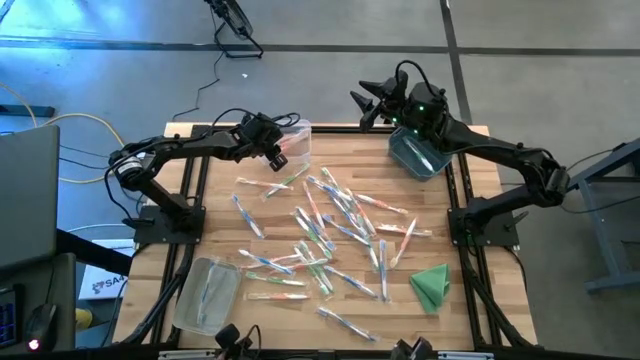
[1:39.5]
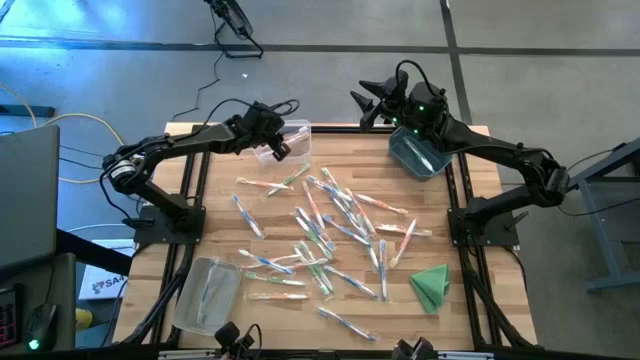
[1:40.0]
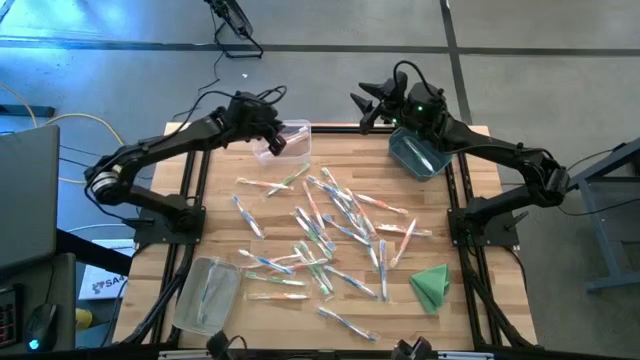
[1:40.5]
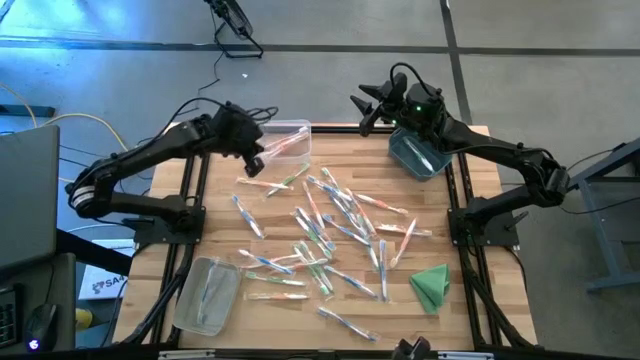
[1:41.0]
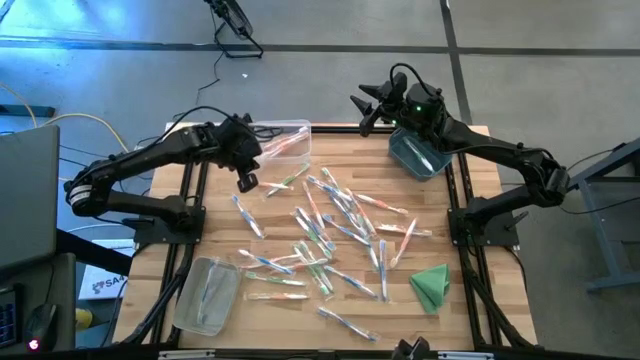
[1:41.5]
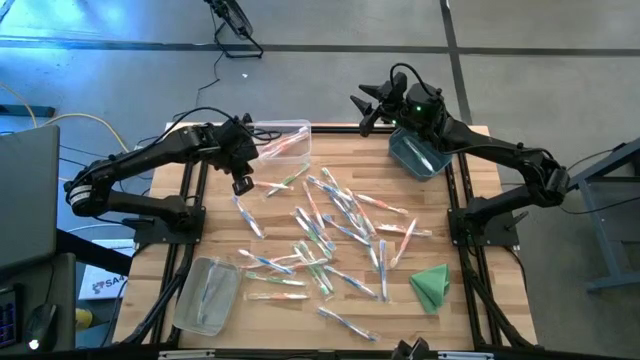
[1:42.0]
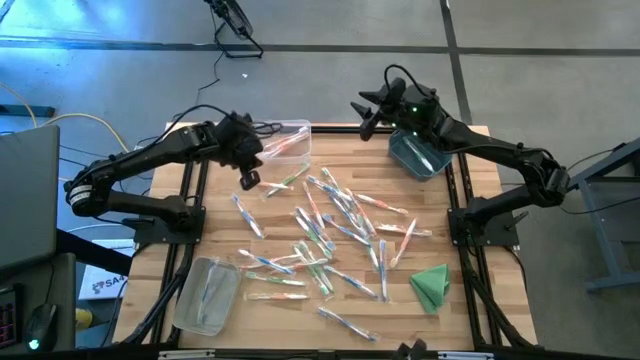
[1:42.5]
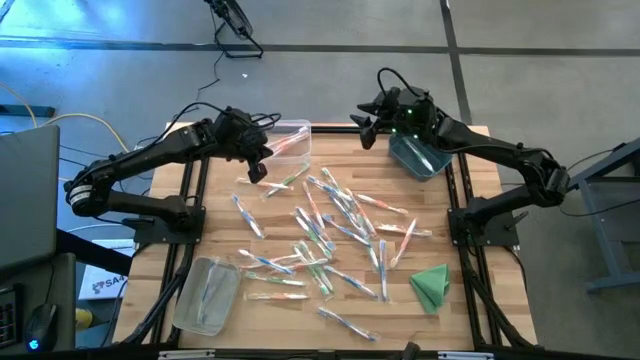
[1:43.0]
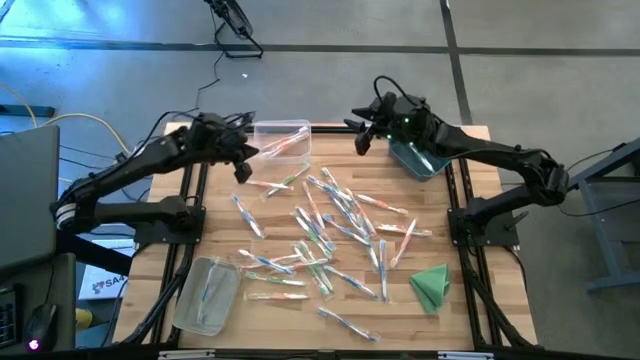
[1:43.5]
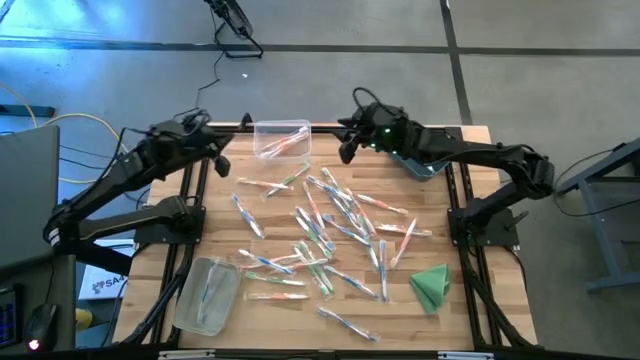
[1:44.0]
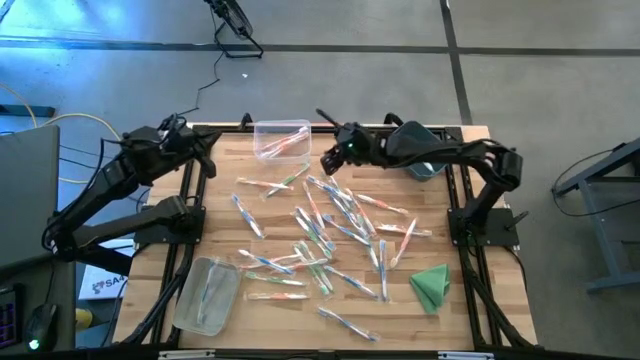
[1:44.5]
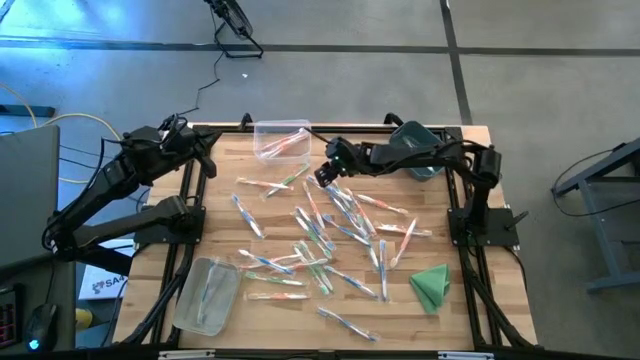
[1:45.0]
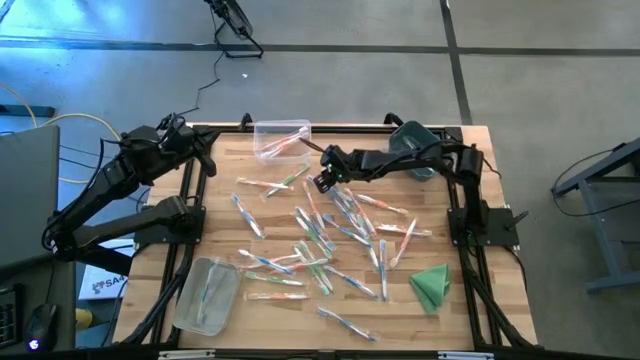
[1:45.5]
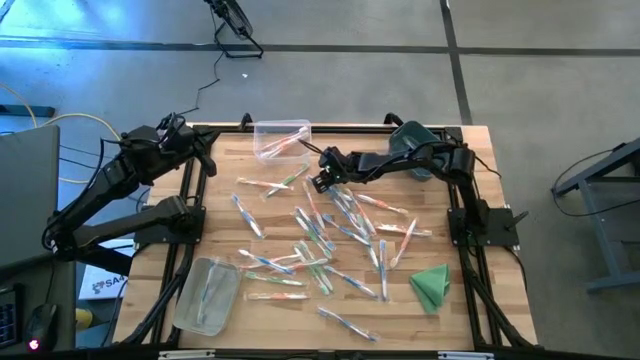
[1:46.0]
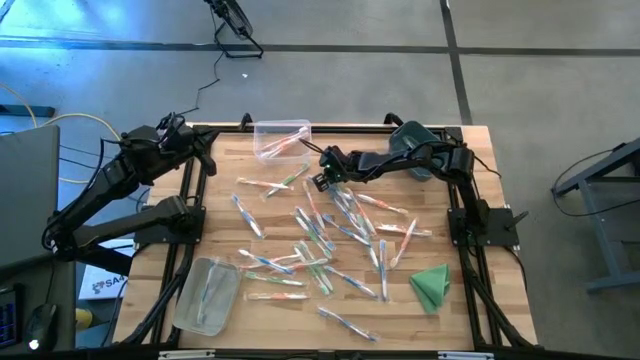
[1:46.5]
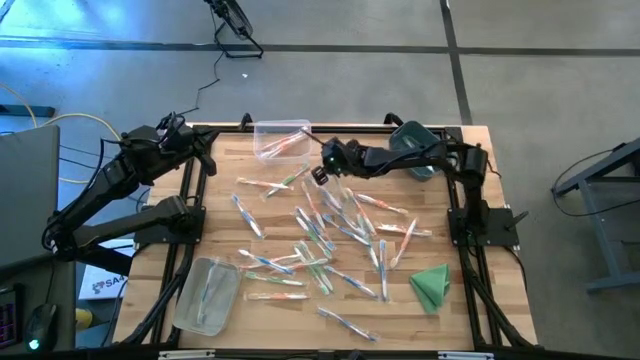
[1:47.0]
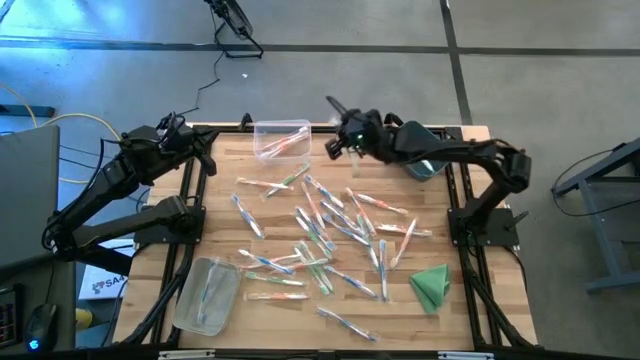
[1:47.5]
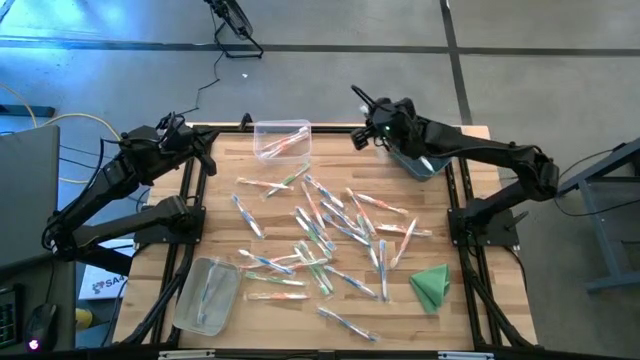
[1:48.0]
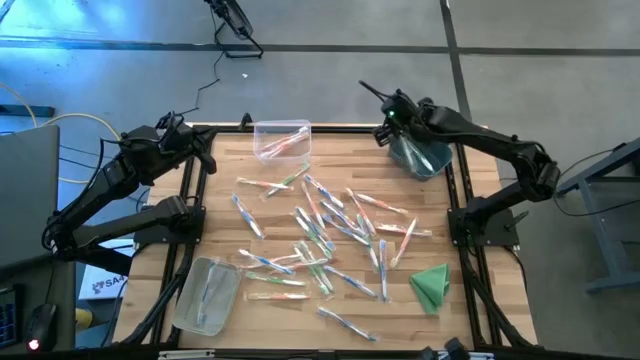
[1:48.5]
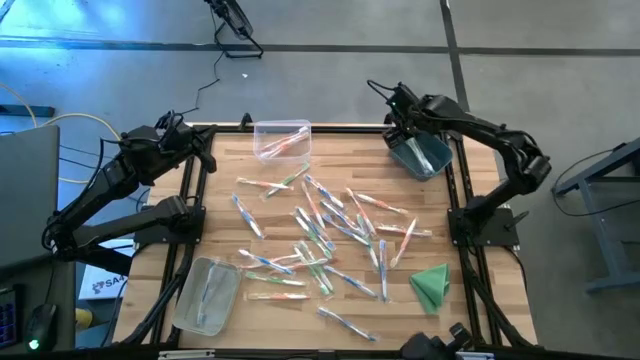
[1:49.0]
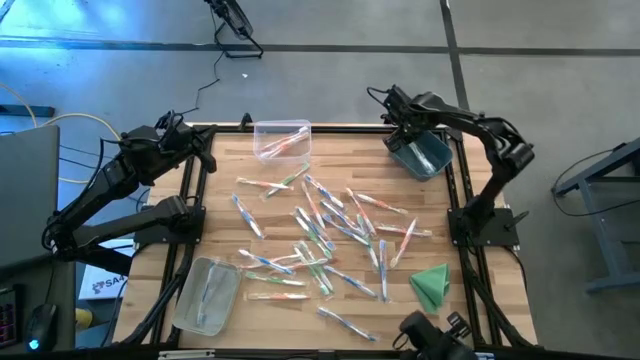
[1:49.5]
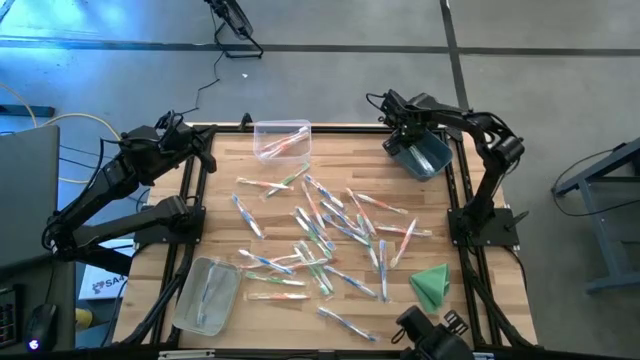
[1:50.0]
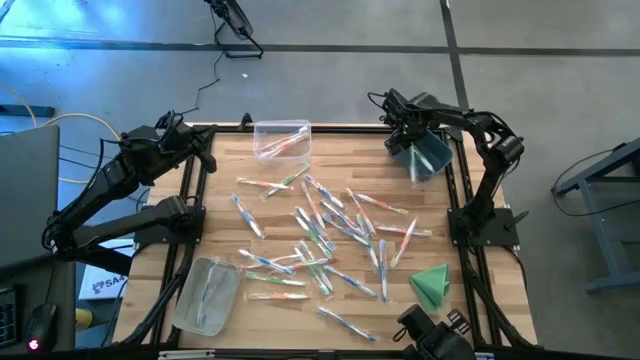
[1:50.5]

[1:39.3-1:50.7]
Task: Pick & Place Toothbrushes
Put the green toothbrush into the blue bin
